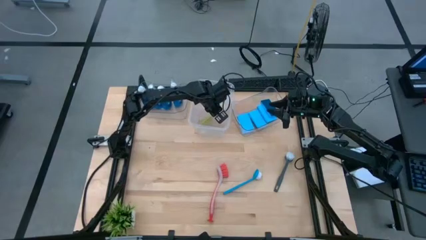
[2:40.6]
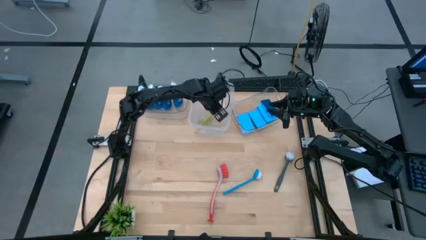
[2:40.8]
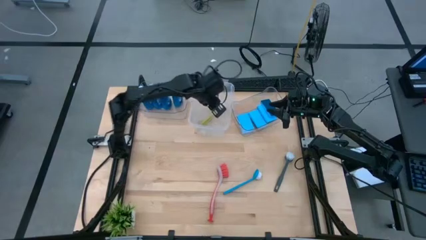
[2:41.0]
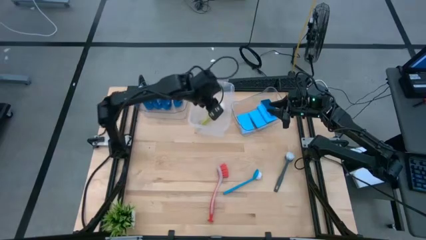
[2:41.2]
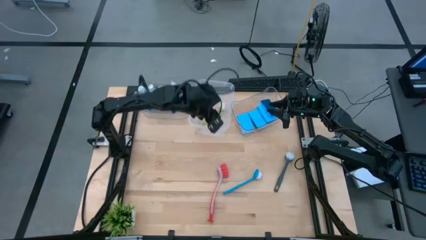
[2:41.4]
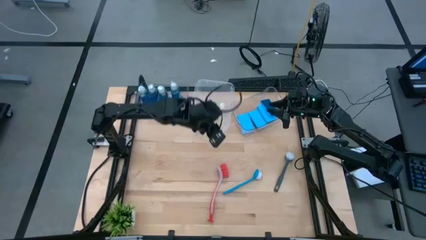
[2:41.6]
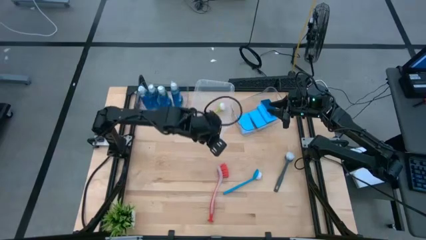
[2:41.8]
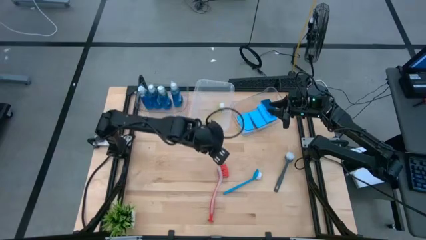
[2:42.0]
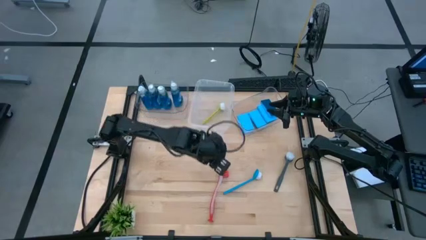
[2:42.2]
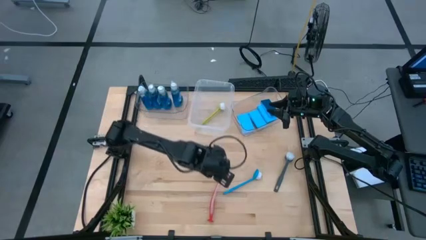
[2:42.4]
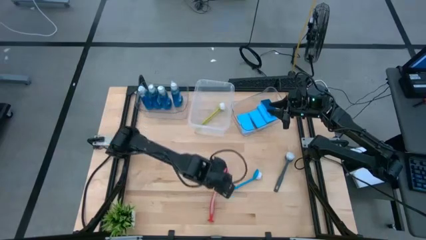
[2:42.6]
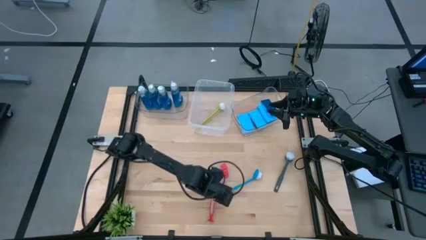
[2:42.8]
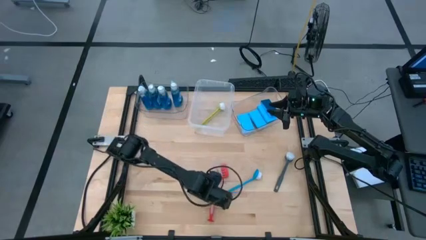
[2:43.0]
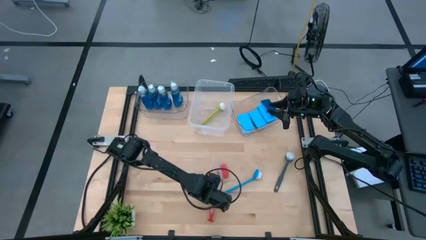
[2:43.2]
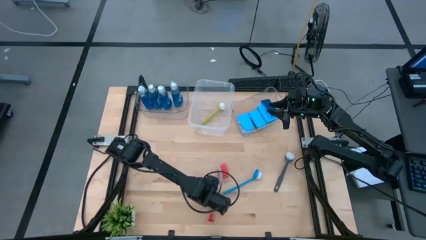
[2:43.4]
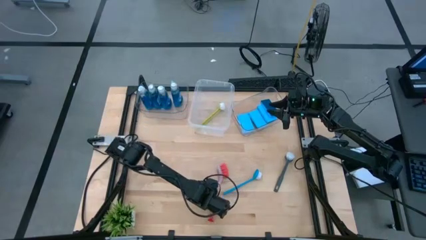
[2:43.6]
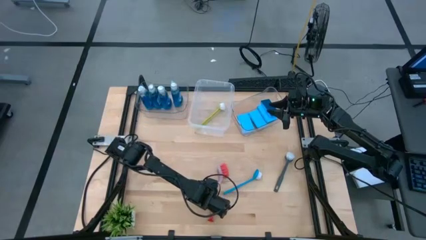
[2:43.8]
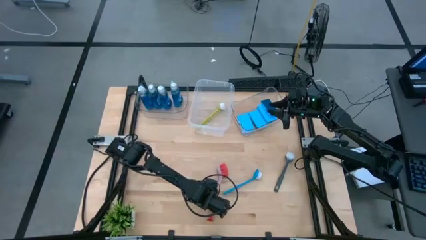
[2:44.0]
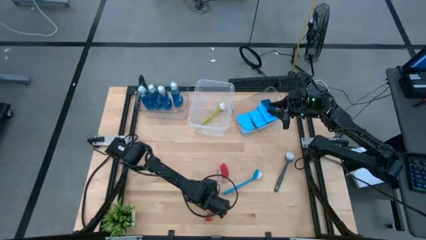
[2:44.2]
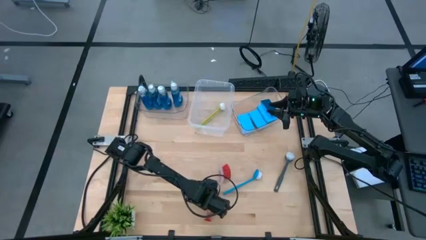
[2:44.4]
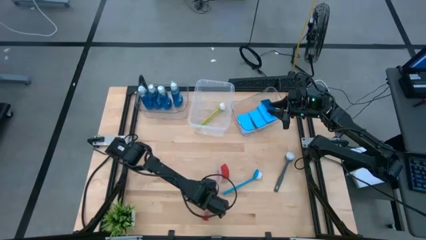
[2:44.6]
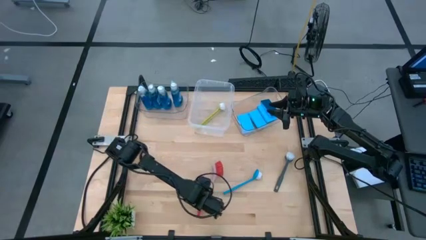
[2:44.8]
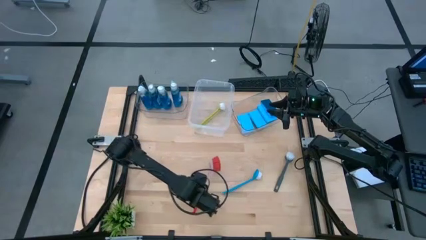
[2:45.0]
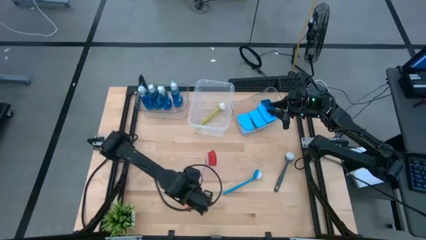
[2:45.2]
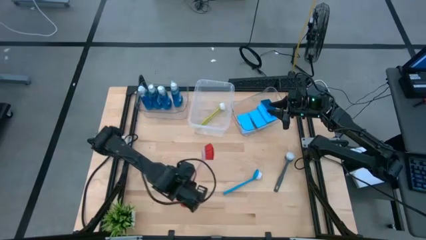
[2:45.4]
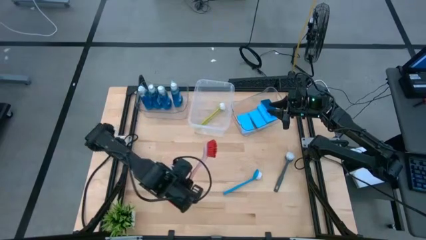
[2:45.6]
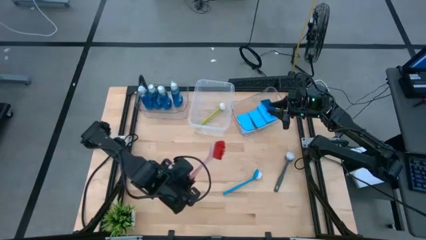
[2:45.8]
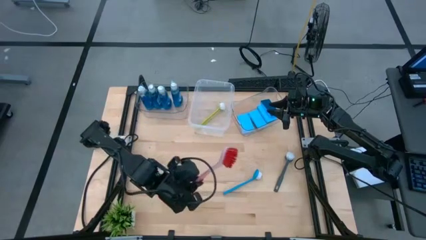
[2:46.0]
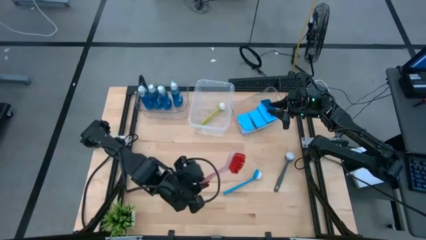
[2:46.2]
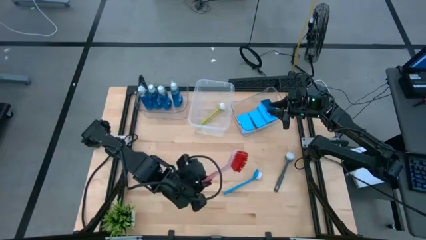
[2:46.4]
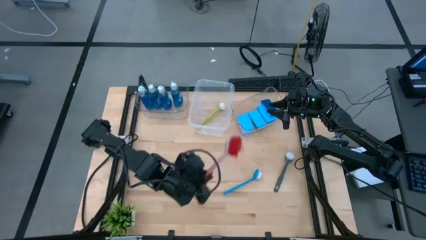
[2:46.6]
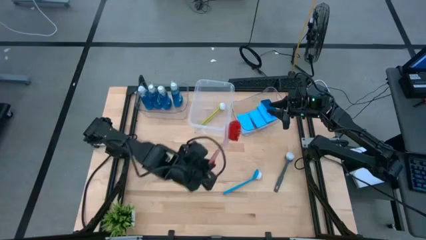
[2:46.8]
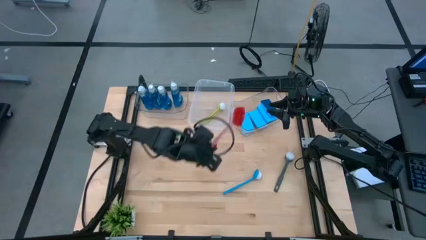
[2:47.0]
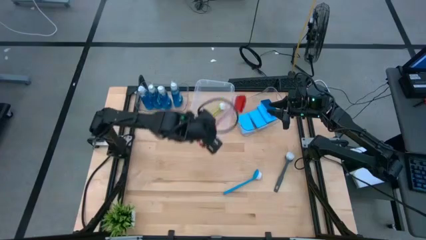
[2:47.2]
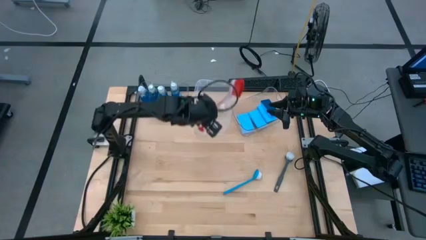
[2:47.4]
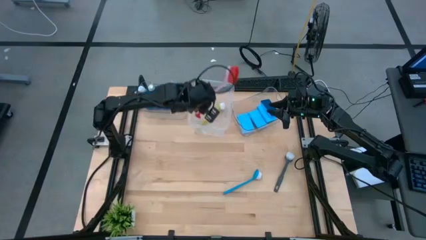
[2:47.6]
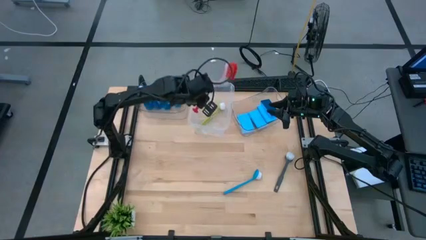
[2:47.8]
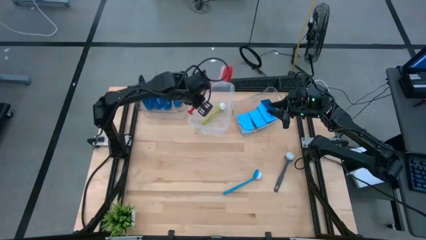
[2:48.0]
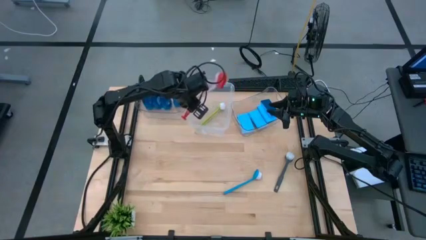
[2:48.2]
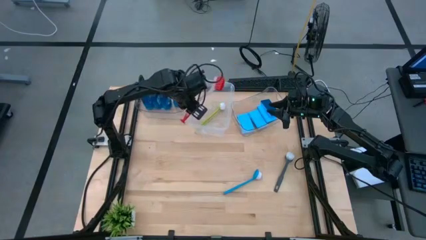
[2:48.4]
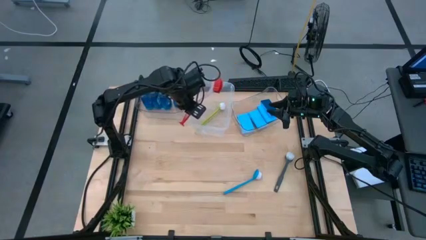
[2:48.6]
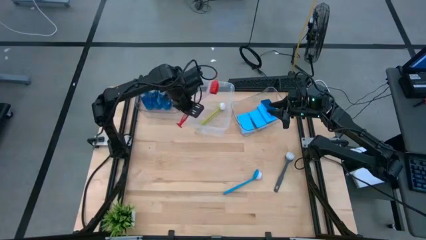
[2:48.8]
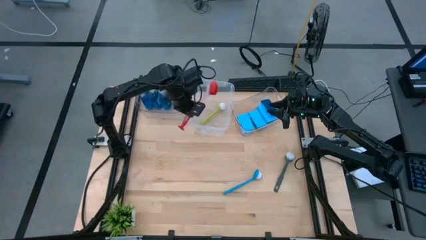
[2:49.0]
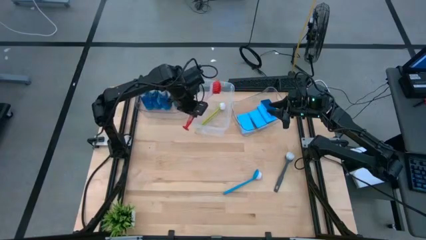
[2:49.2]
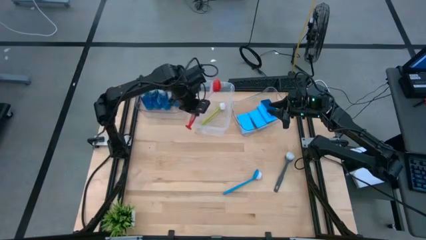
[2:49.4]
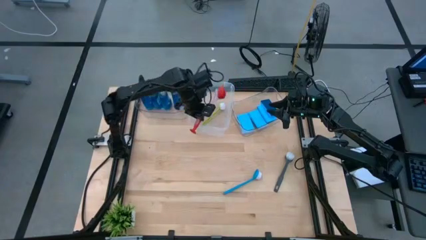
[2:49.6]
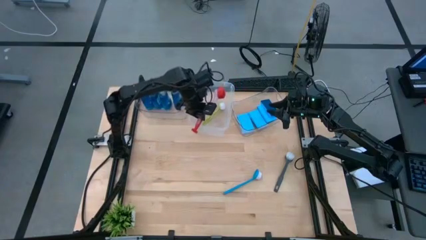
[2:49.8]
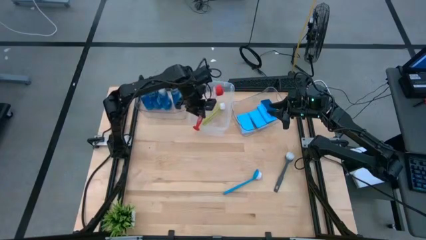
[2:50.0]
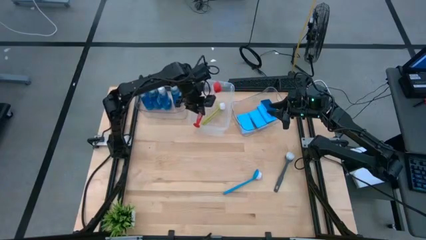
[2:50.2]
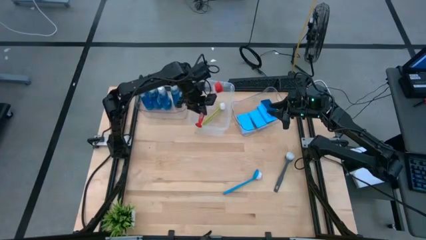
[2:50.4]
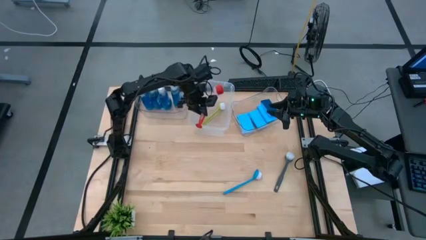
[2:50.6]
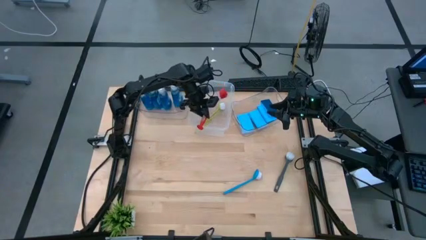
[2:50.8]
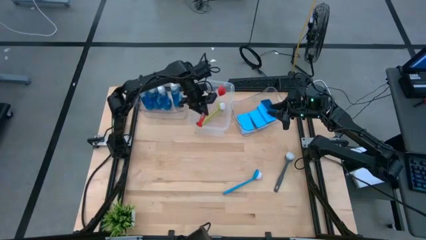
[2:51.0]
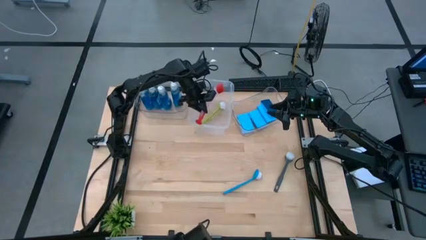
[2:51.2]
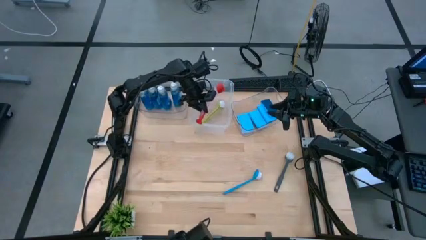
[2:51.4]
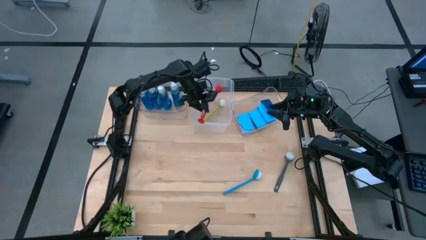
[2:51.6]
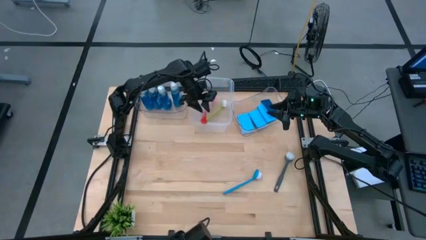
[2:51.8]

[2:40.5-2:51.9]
Task: Pick & Place Kitchen Sink Supplies
Put the red dish brush into the large transparent bin

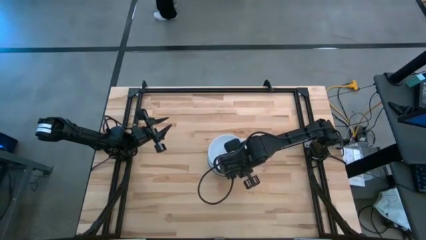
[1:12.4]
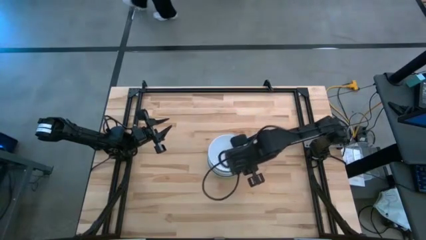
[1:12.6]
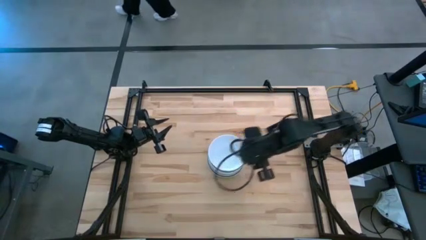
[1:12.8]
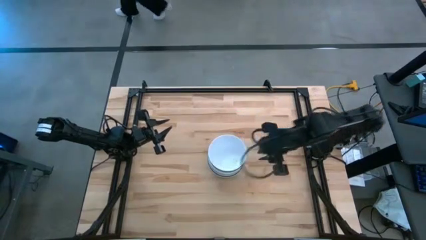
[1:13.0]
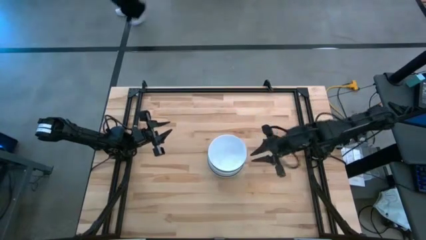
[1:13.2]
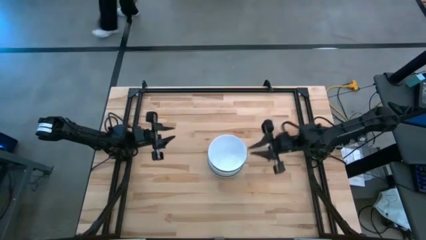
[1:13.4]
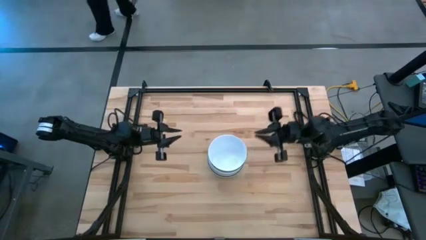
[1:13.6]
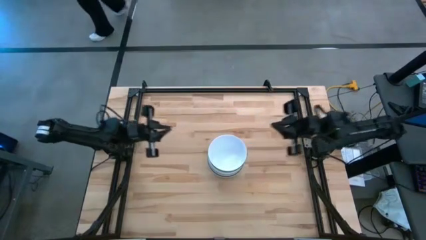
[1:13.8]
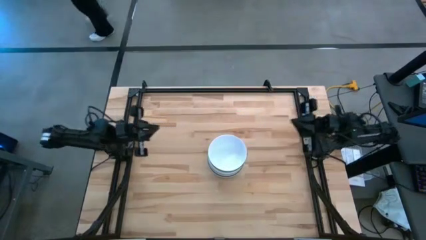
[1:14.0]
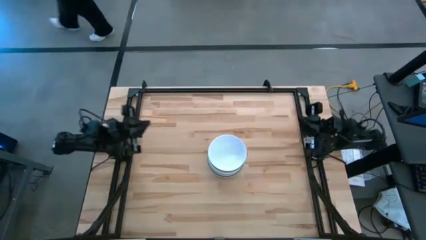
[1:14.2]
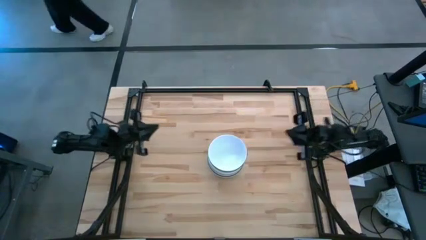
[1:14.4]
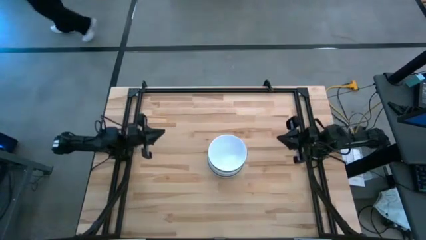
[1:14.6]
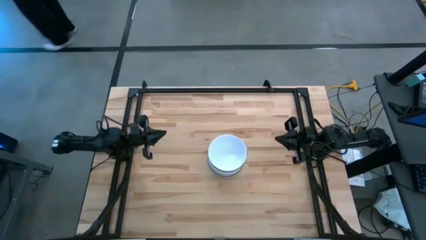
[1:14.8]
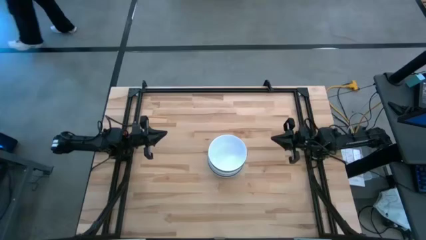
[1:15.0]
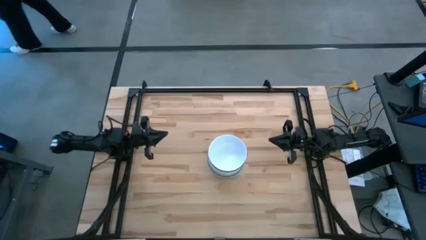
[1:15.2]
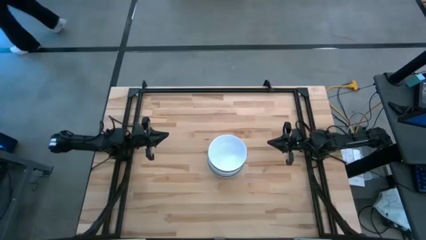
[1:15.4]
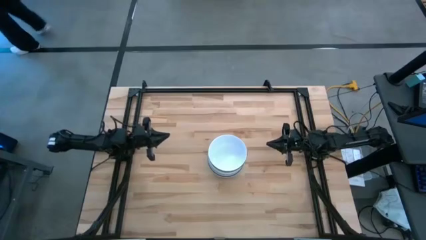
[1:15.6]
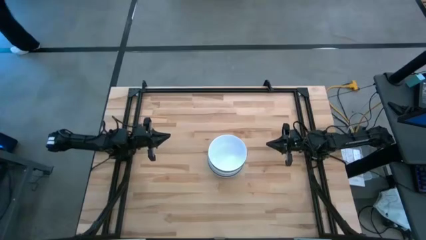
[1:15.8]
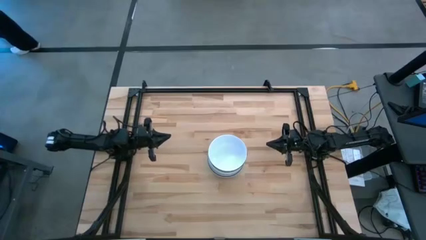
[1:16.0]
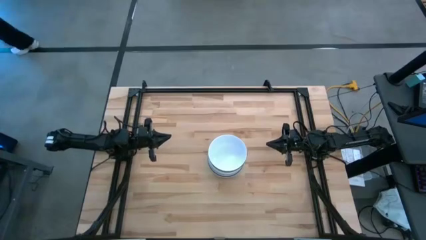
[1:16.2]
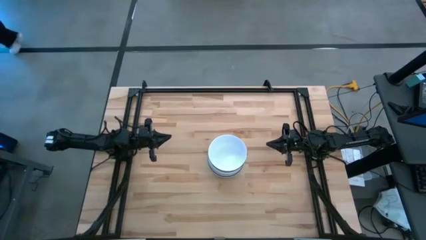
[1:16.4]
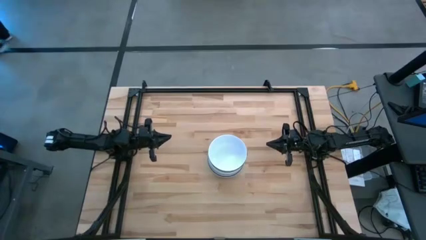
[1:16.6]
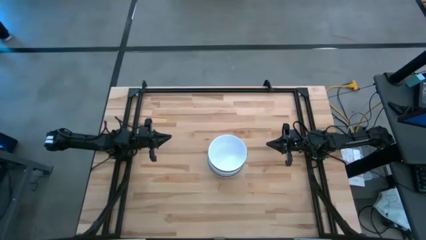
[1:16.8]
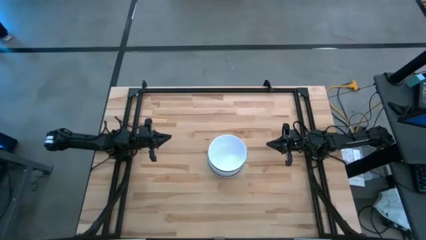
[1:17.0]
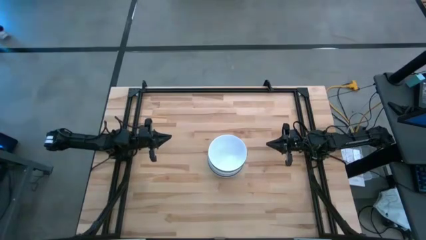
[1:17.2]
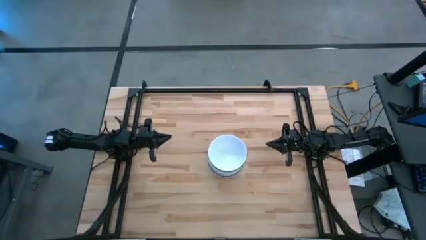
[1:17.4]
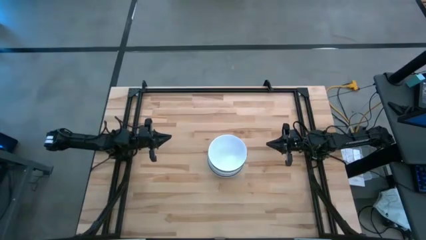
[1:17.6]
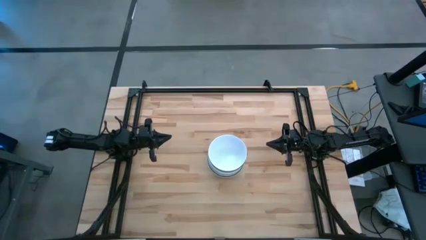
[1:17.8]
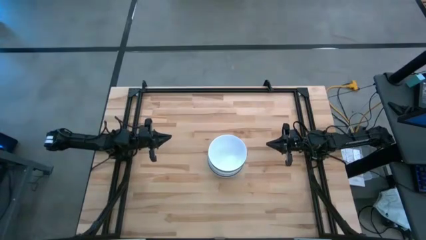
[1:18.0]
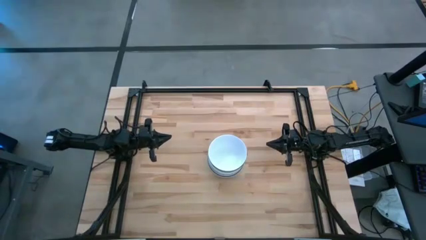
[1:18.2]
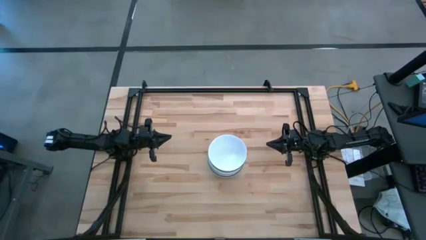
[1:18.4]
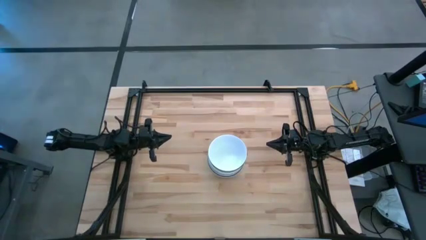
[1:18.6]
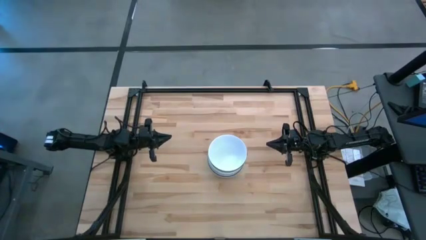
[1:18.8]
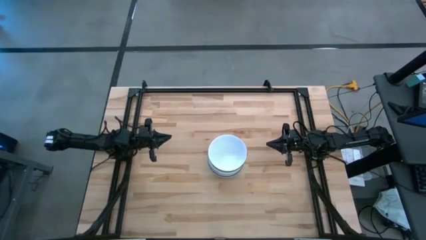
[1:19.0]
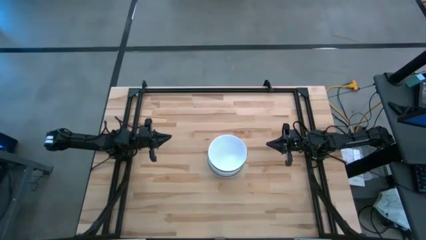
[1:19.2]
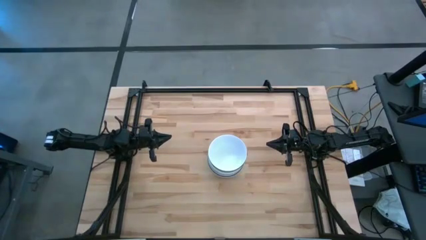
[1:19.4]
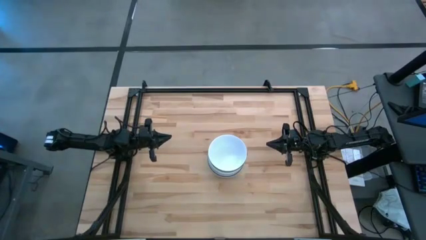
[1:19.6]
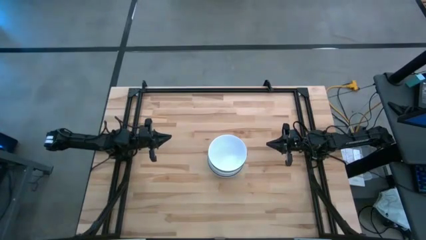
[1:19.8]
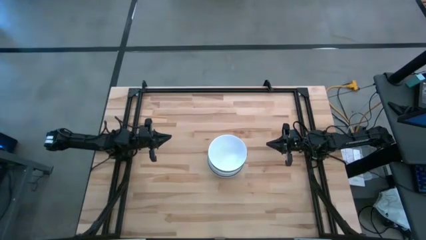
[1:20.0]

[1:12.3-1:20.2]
Task: Nest bowls inside each other
Return to Home Position
